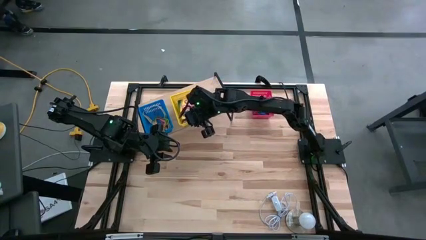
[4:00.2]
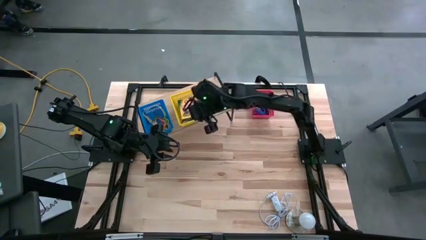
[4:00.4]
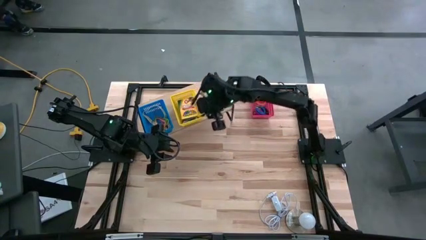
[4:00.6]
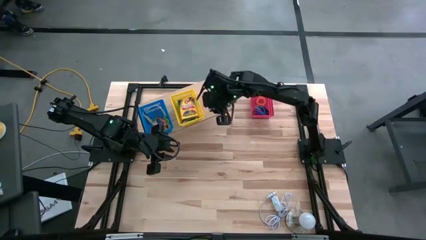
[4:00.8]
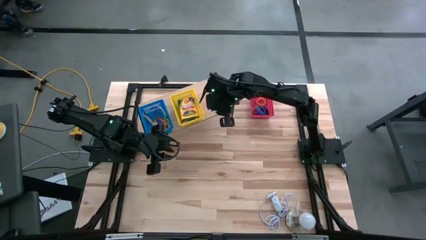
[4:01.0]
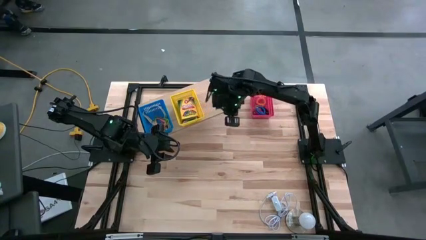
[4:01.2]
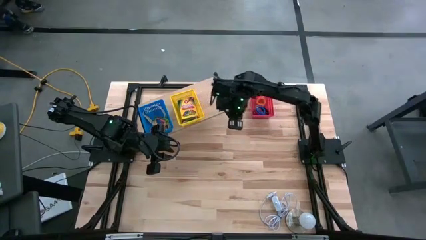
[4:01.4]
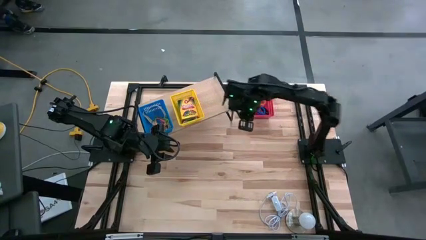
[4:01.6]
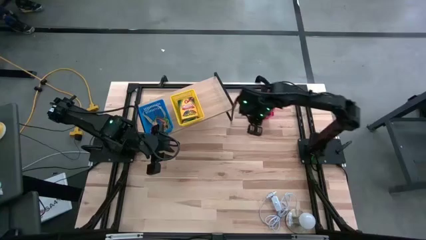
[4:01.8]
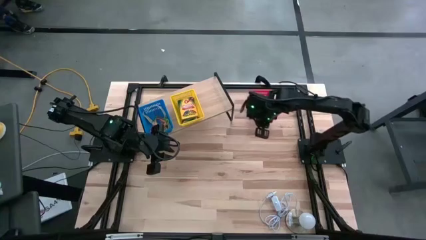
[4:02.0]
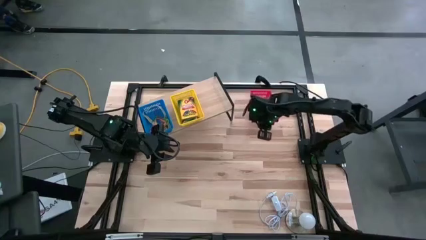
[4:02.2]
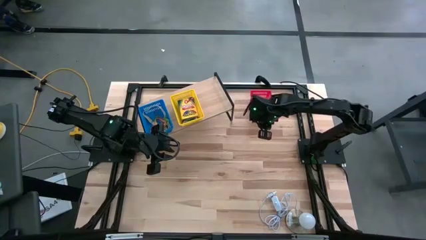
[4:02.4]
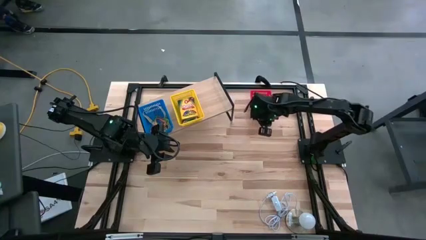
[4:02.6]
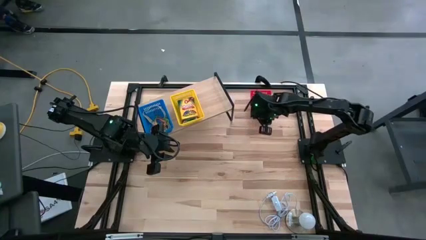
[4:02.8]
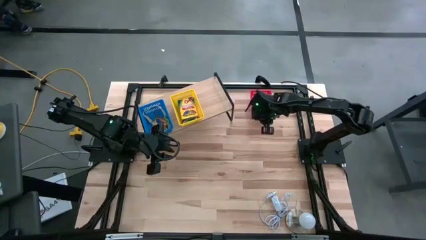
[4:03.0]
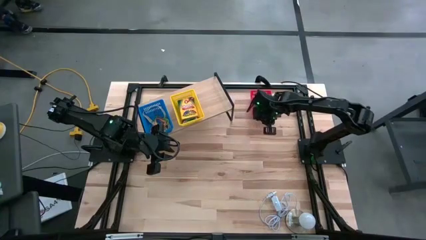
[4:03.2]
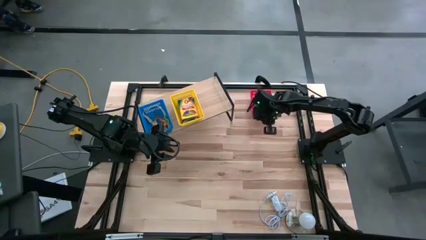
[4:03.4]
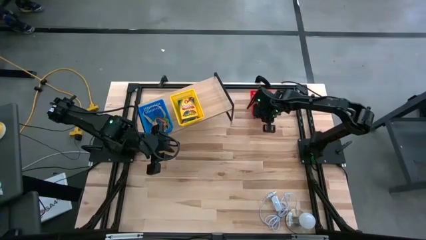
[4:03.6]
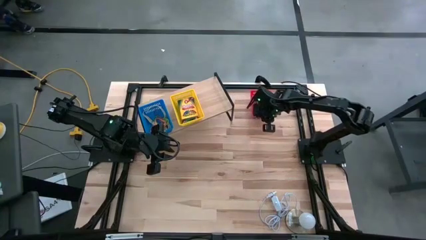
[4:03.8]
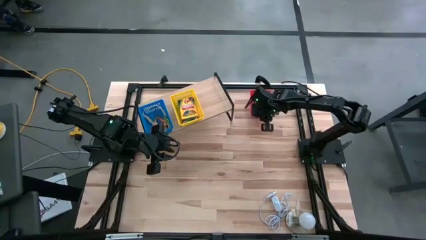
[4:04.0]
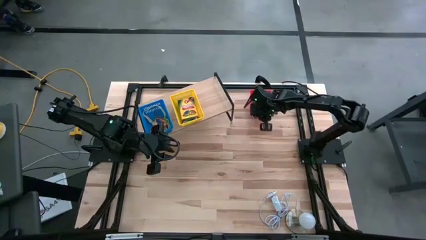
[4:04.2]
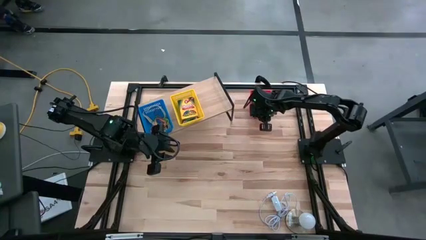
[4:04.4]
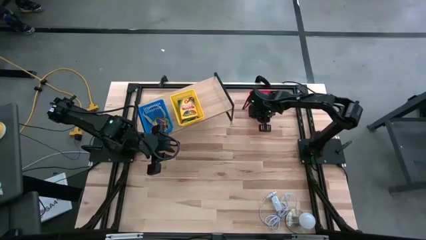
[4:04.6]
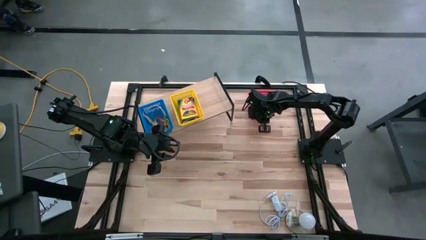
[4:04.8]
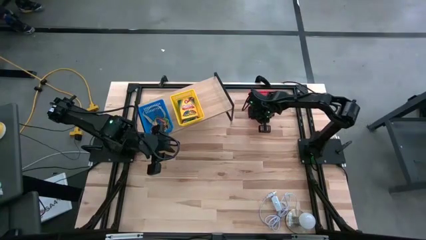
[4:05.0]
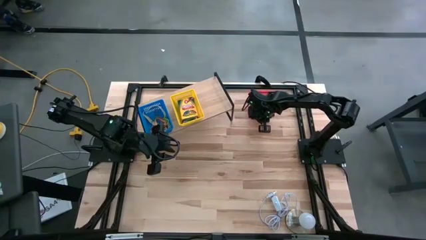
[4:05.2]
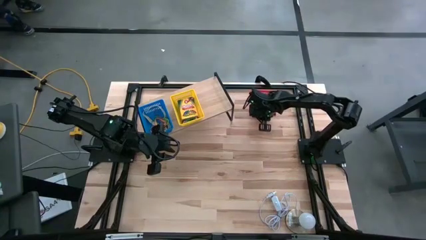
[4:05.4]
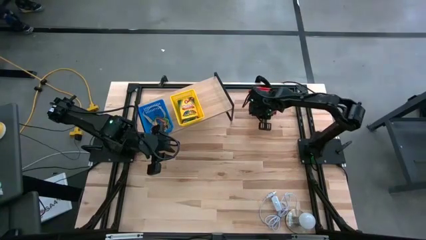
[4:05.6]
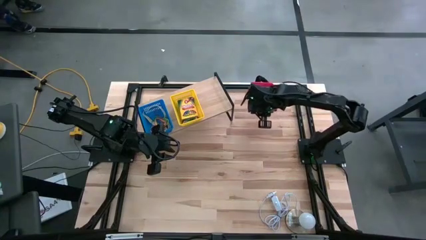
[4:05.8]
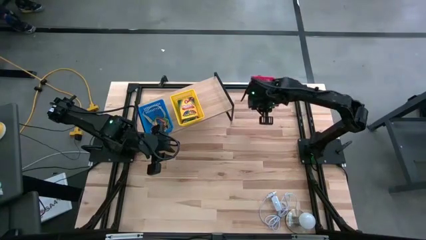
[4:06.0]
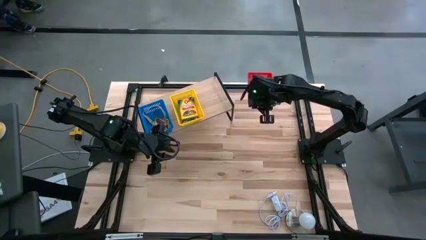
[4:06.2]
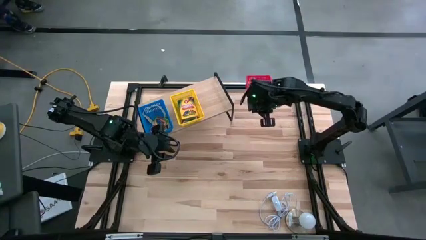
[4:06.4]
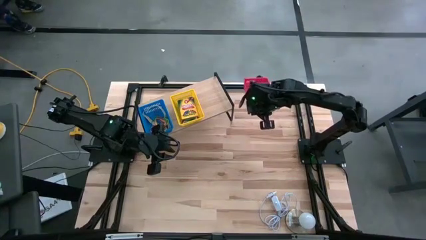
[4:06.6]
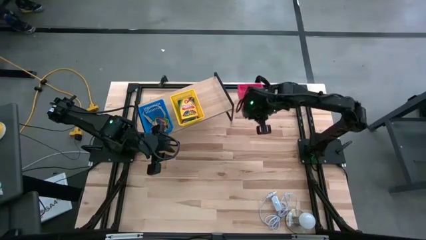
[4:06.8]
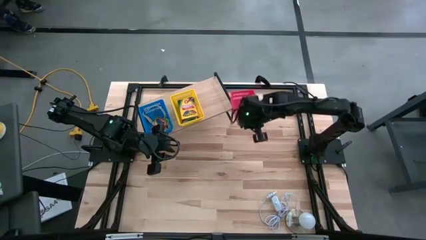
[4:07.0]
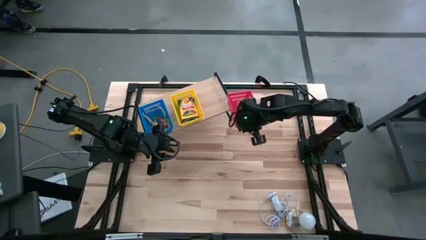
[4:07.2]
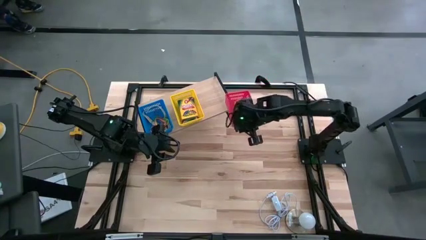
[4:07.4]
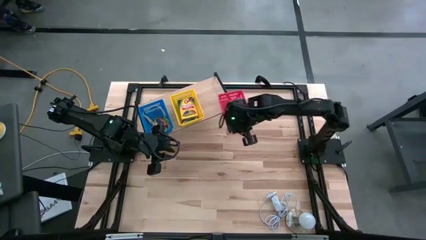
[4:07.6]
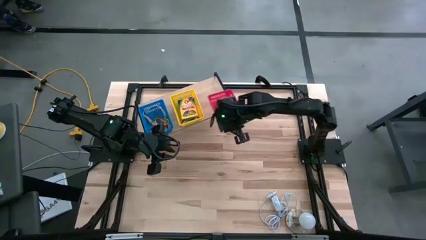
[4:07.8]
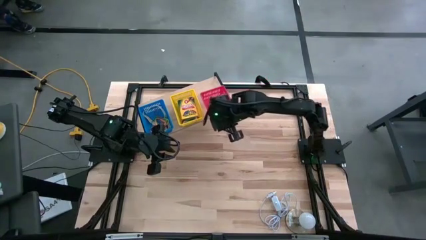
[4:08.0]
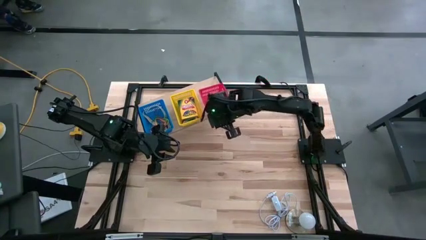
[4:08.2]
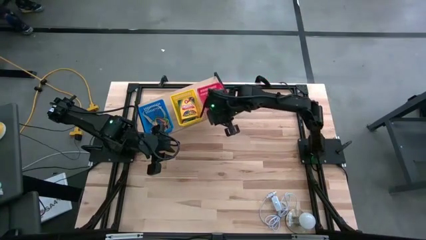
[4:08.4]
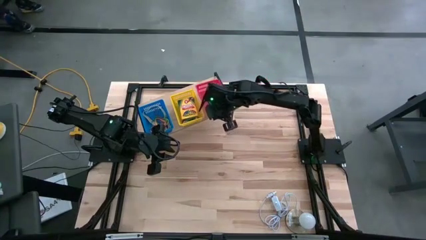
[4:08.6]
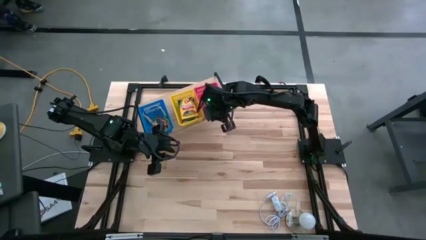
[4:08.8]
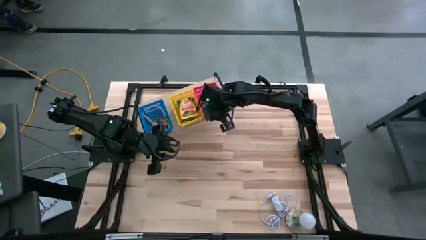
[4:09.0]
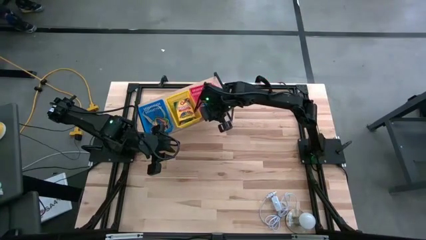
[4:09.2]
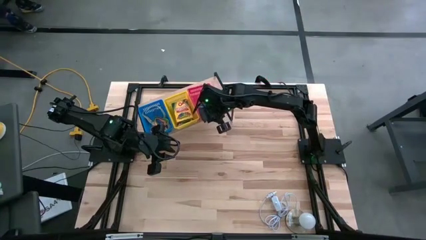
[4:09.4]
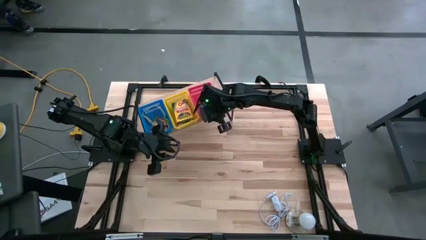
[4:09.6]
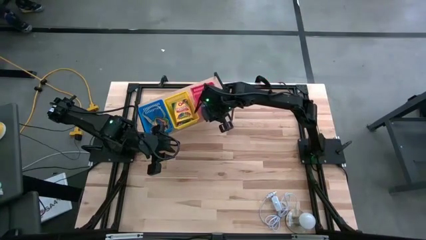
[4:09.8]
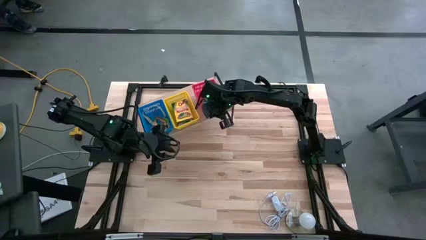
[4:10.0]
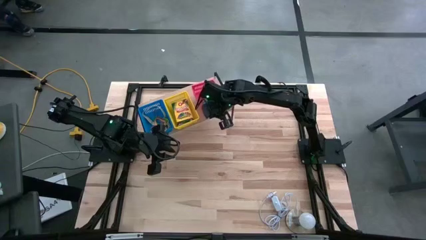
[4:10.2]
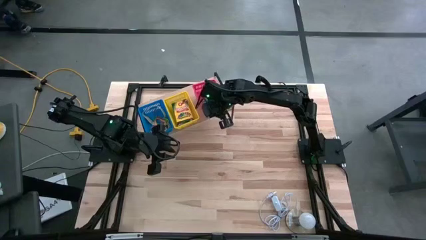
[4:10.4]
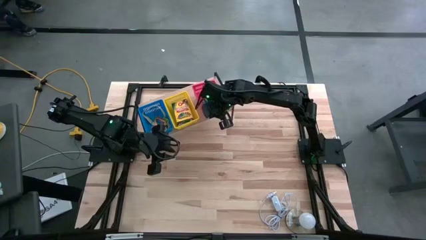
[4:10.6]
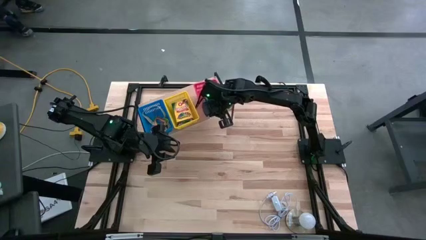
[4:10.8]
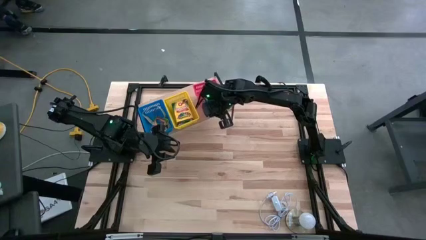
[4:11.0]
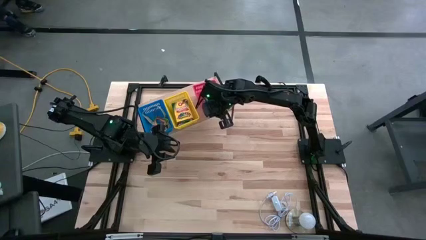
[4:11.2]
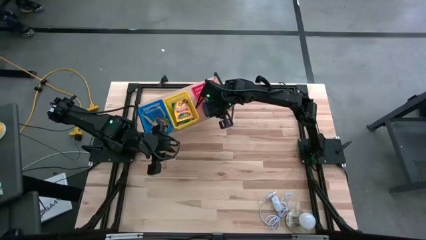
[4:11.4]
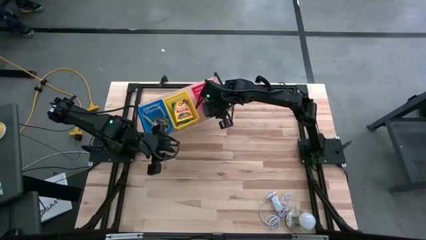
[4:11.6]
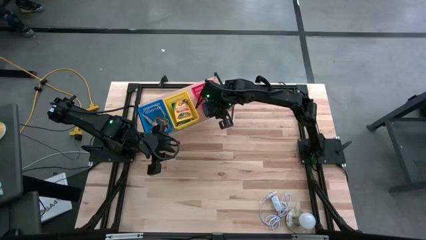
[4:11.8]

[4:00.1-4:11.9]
Task: Pick & Place Office Desk Supplies
Put the red bin with spring keychains on the shelf
